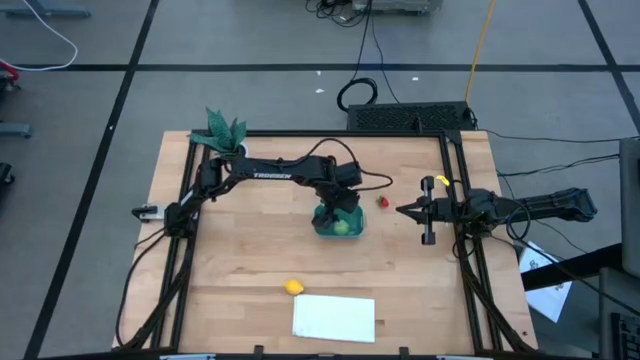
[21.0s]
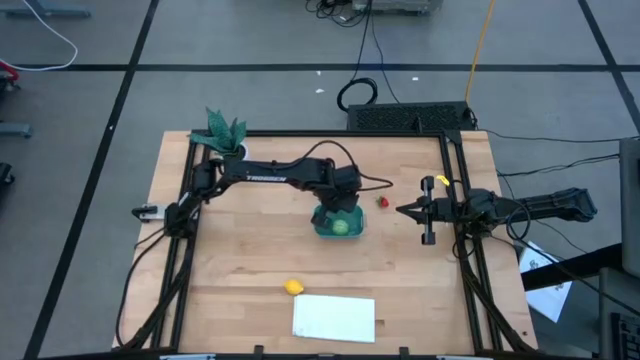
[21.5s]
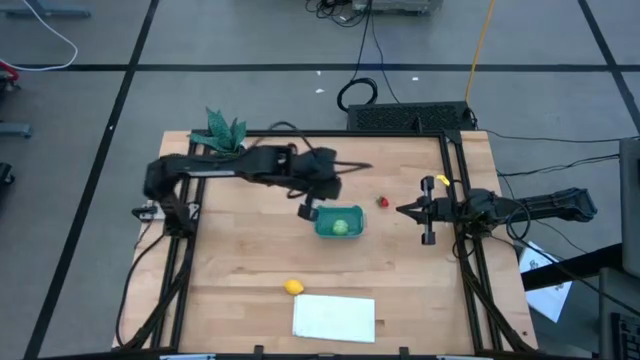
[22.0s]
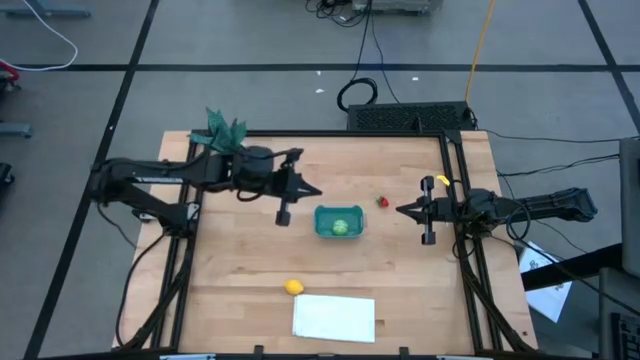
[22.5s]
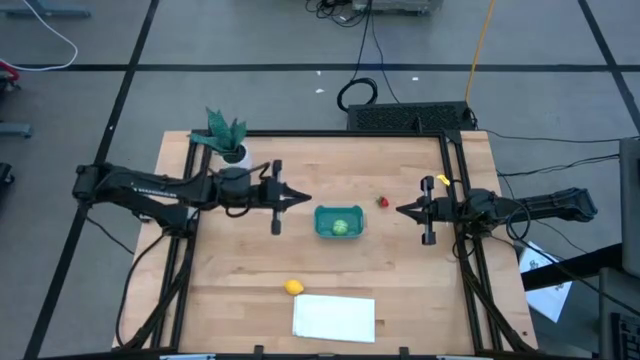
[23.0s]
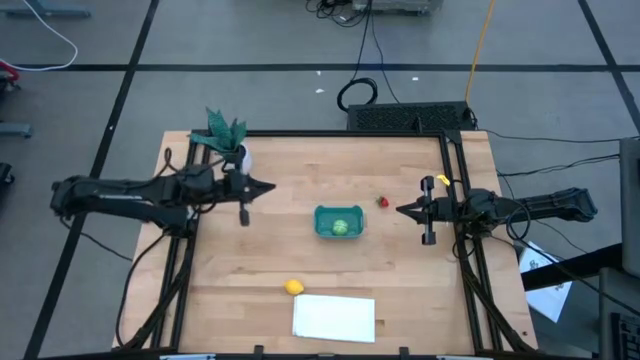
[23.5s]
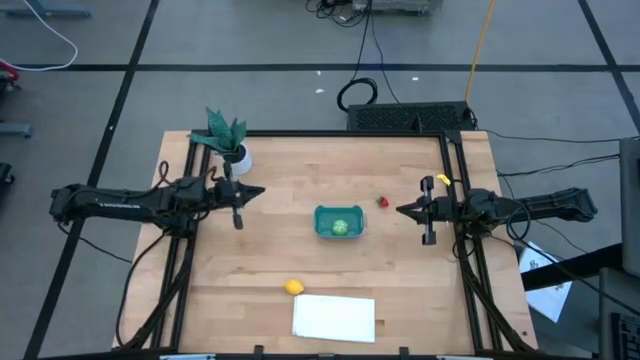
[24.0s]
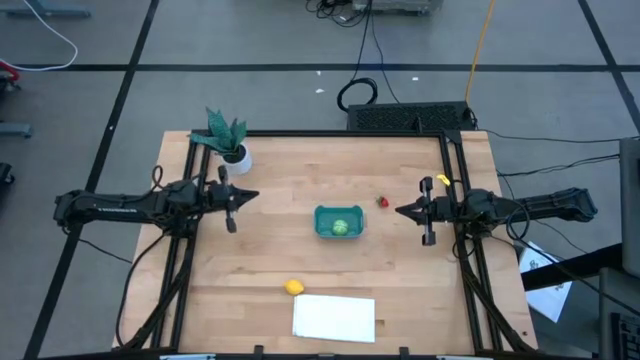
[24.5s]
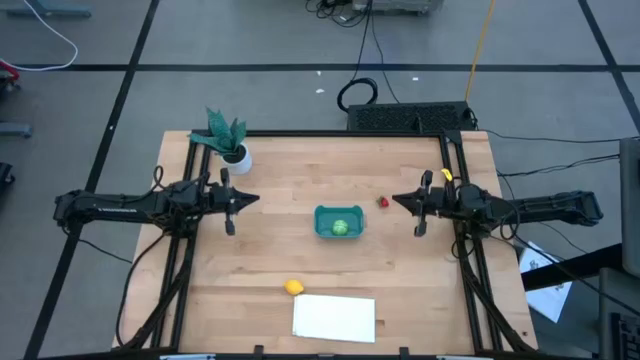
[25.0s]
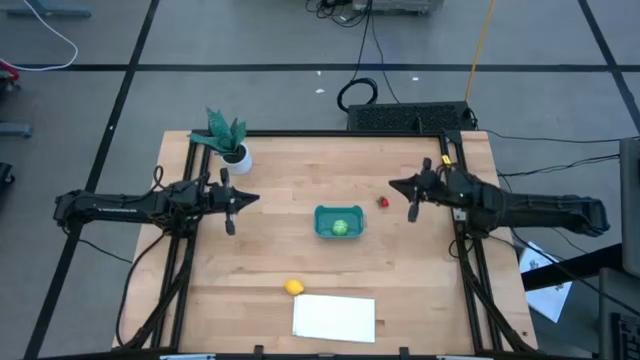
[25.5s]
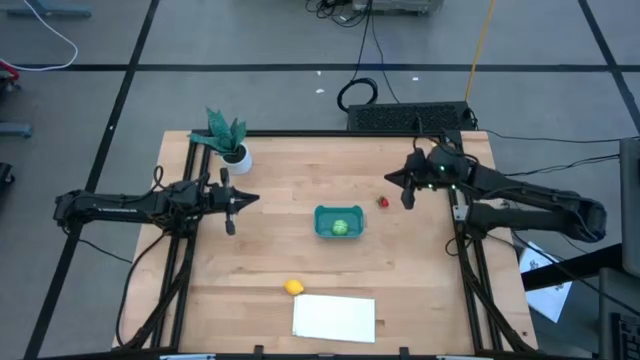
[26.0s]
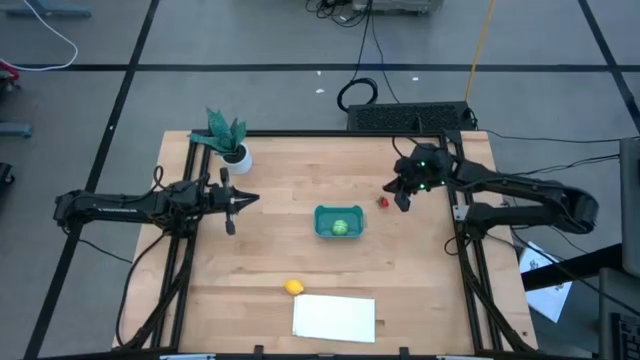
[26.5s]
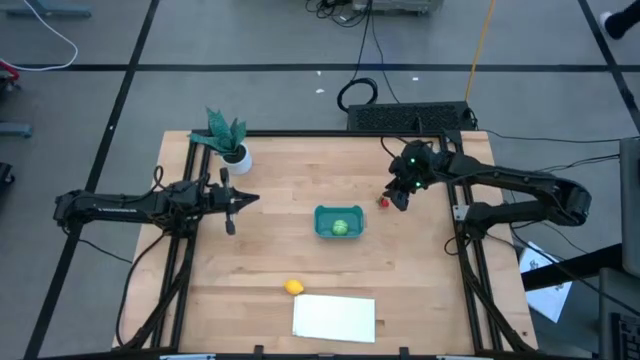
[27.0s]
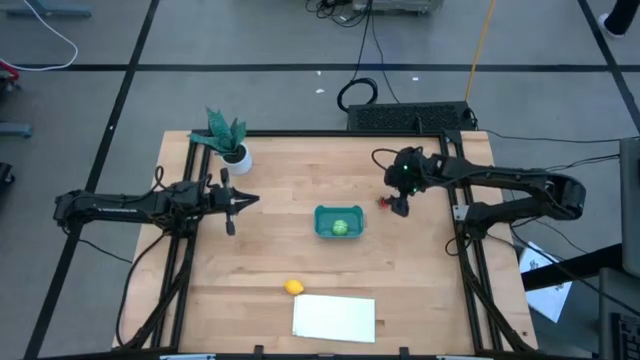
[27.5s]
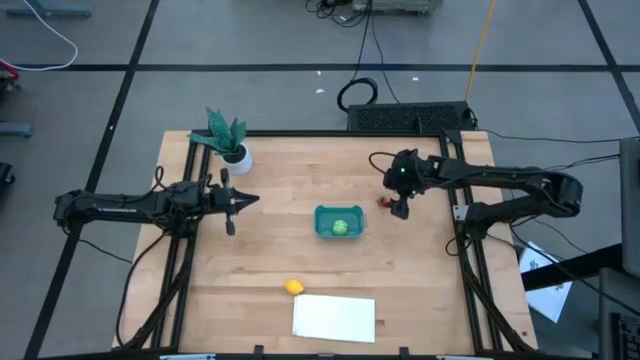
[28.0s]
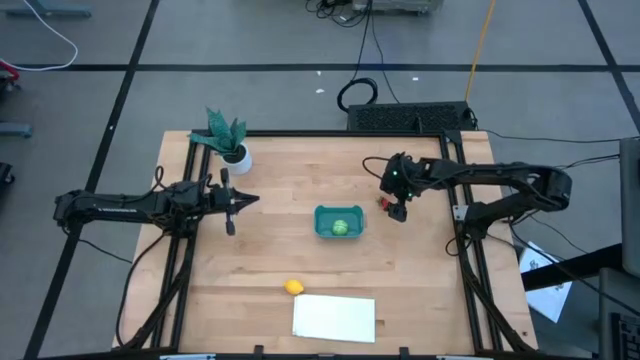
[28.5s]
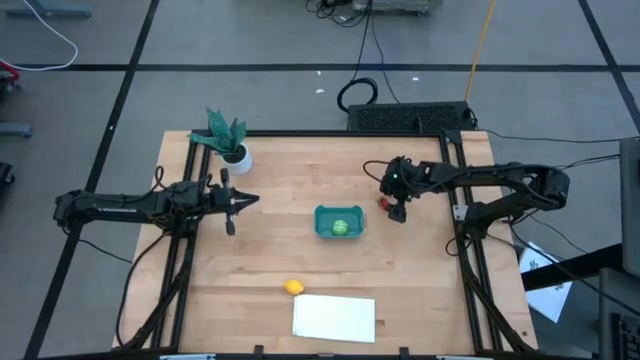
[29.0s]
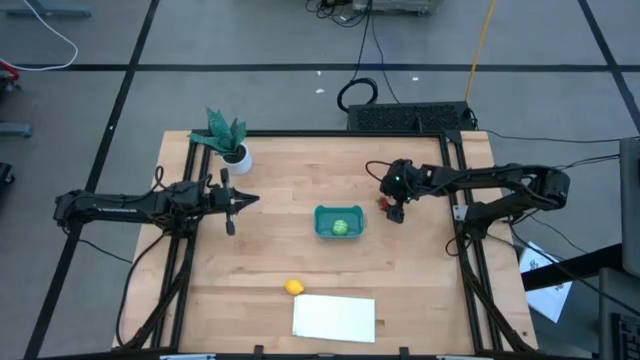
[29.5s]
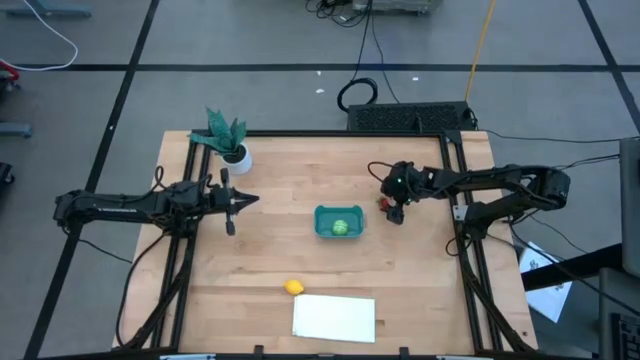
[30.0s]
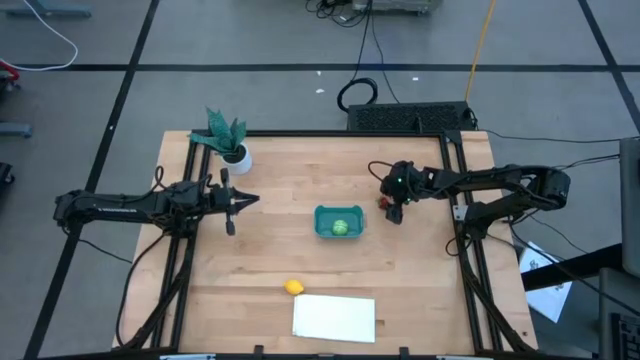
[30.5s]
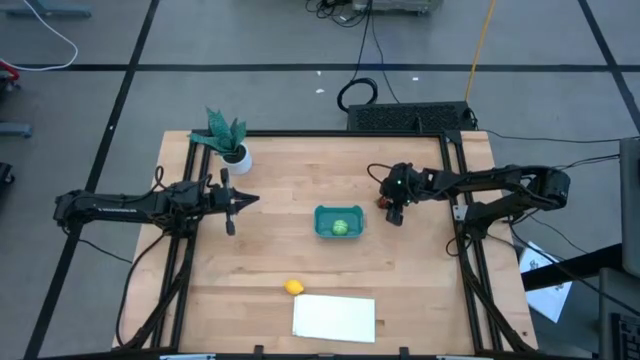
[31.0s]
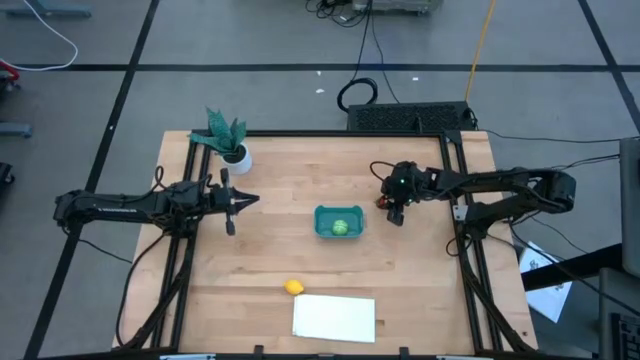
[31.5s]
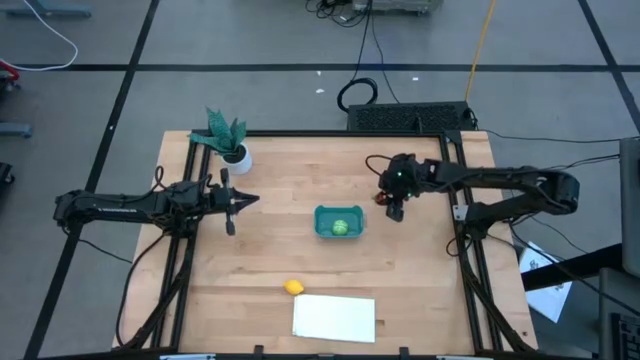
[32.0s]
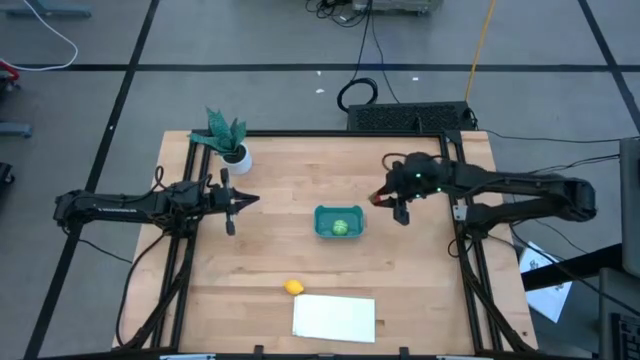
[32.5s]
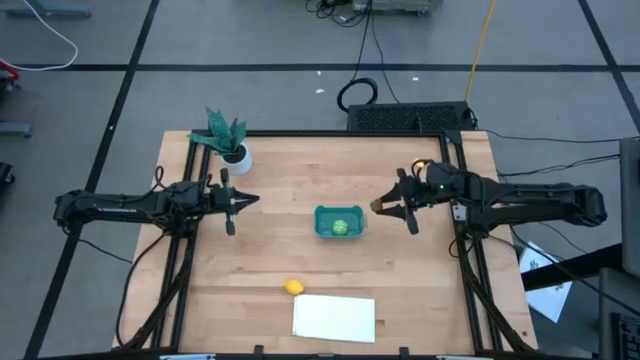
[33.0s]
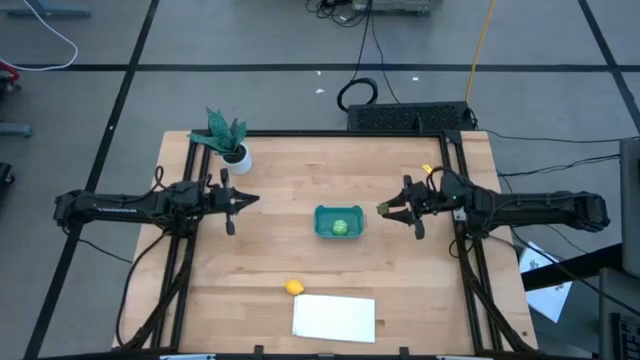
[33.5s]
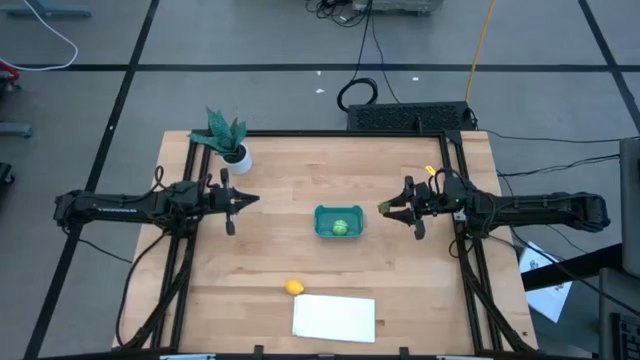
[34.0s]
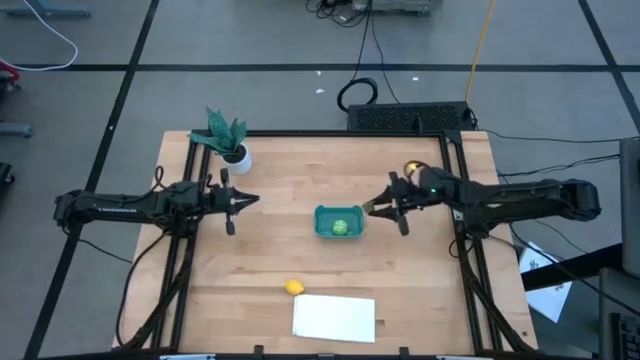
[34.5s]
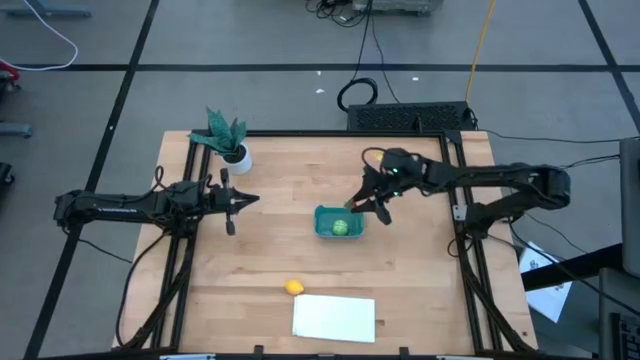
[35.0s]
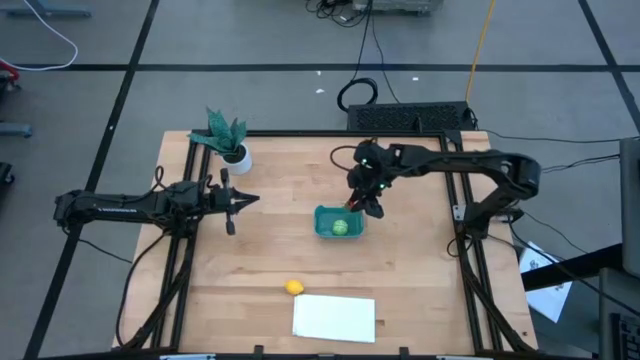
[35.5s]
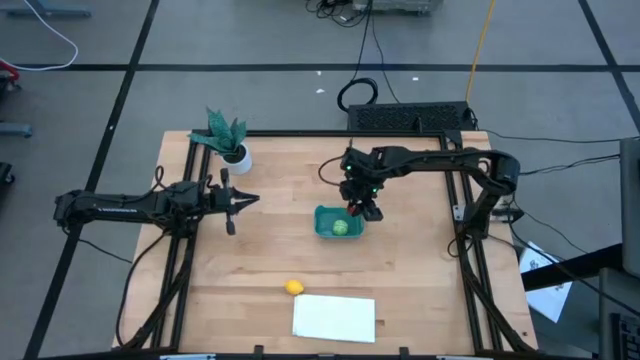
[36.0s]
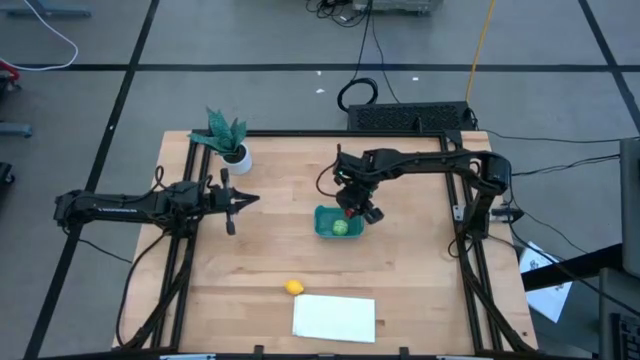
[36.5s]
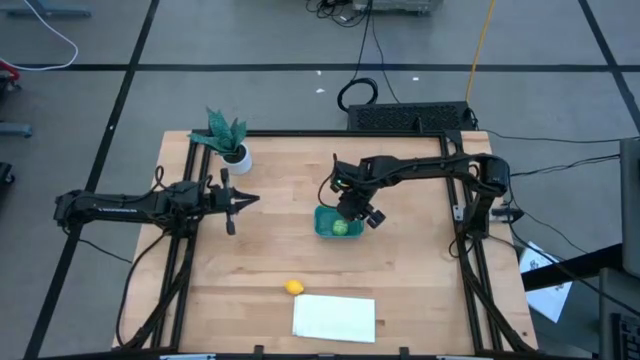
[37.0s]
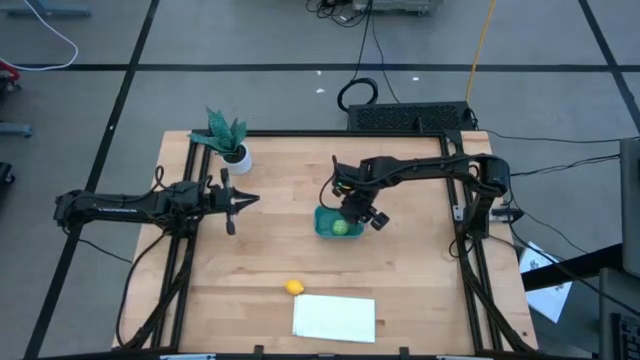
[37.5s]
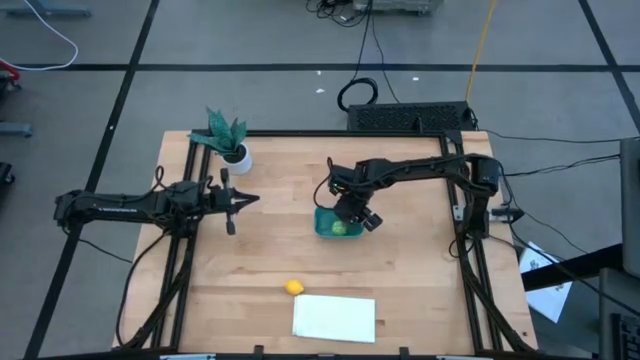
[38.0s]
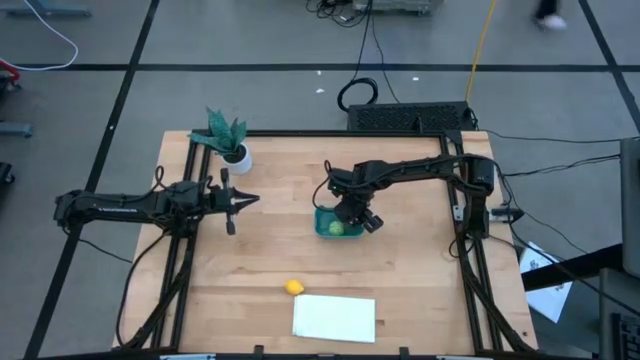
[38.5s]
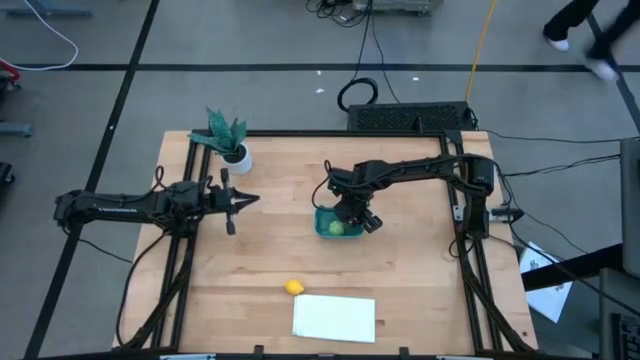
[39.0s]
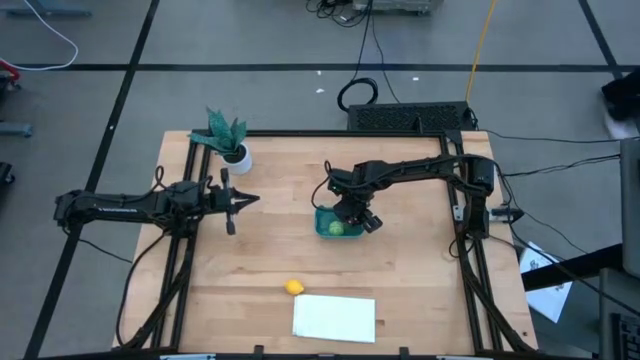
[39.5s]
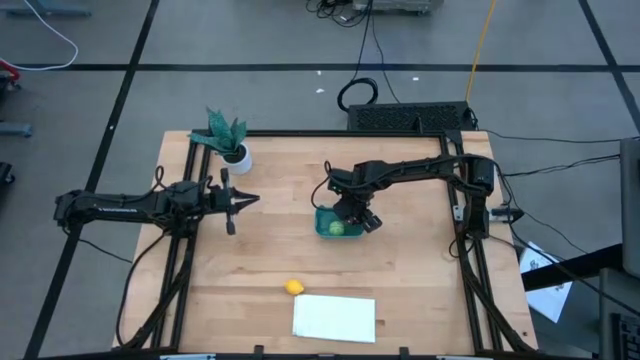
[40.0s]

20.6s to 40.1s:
Task: Pick and placing Produce into tupperware
Put the red strawberry into the blue bin

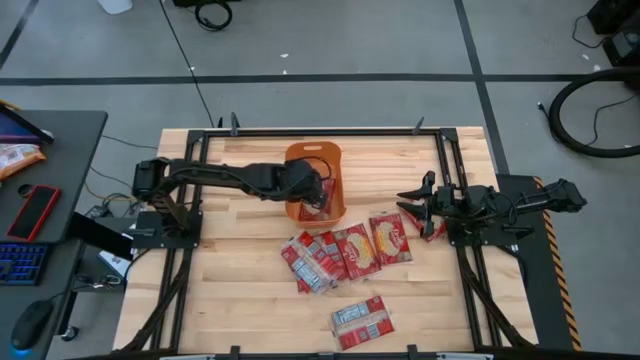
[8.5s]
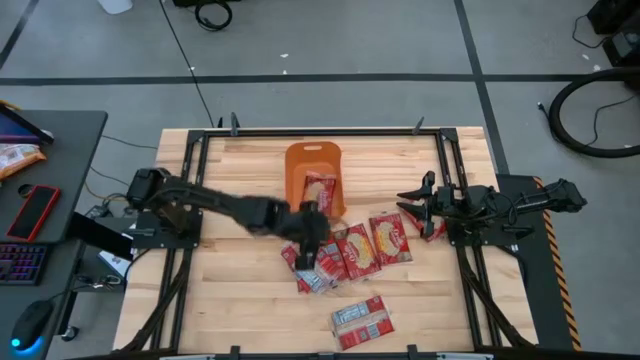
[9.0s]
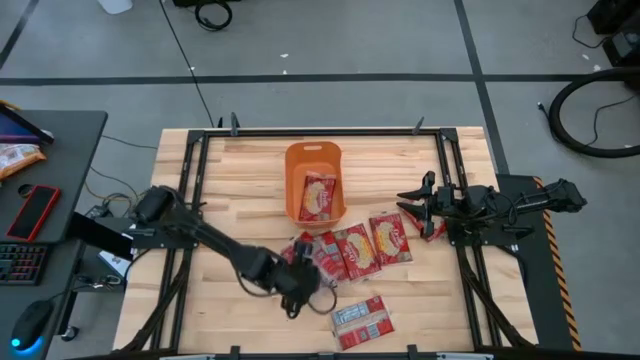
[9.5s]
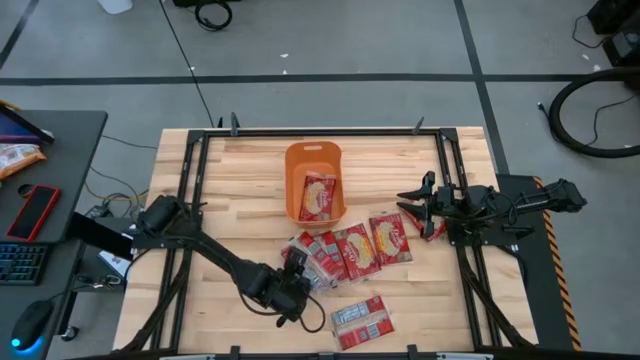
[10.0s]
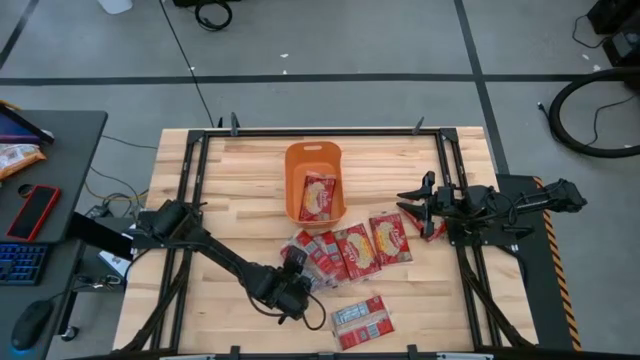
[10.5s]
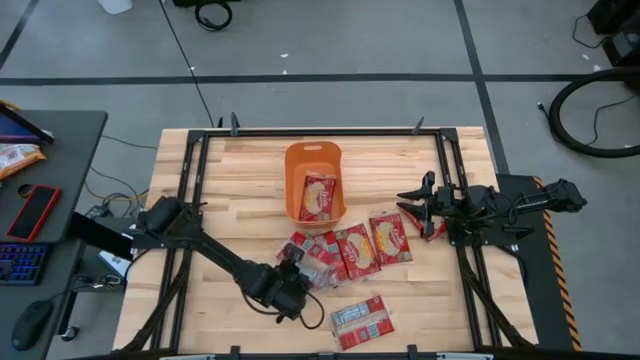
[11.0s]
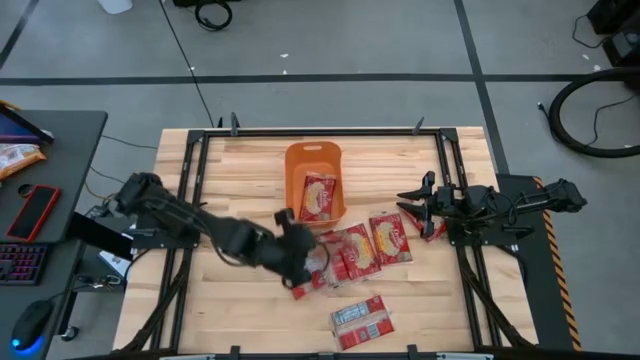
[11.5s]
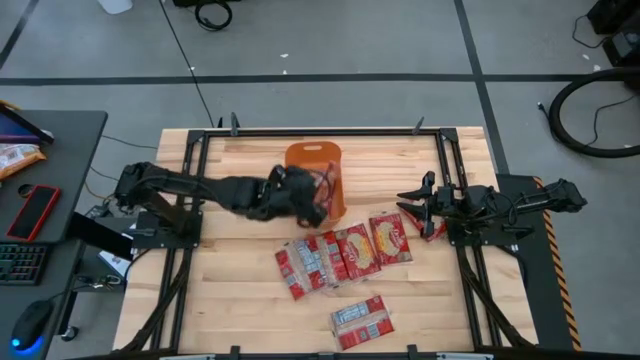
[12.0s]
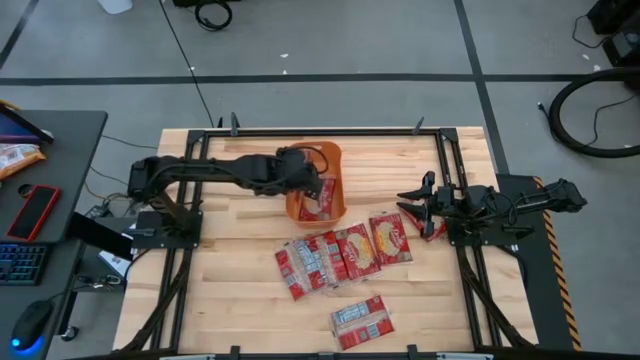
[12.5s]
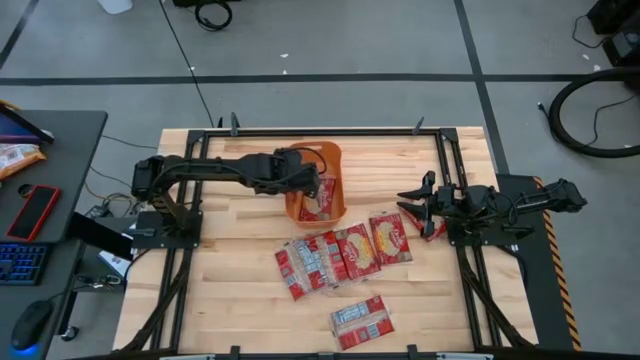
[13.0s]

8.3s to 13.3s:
Task: Sort popcorn bags into baskets
Put the popcorn bag into the orange bin
